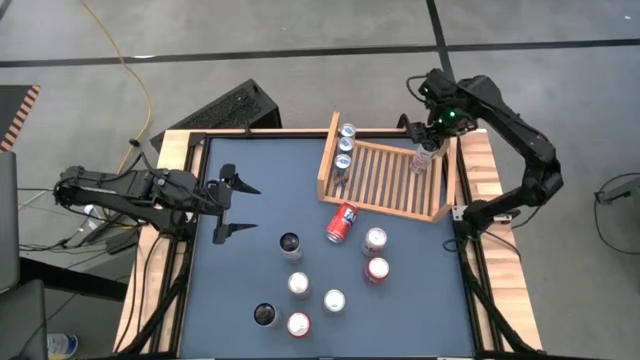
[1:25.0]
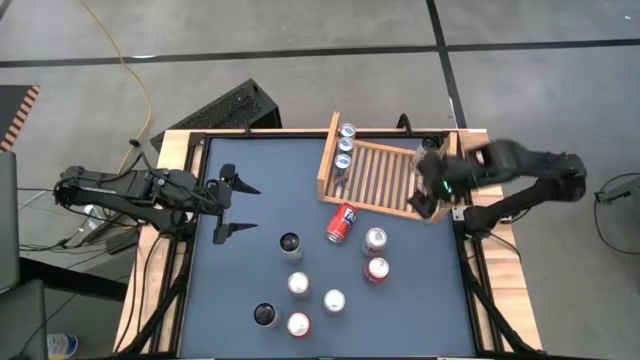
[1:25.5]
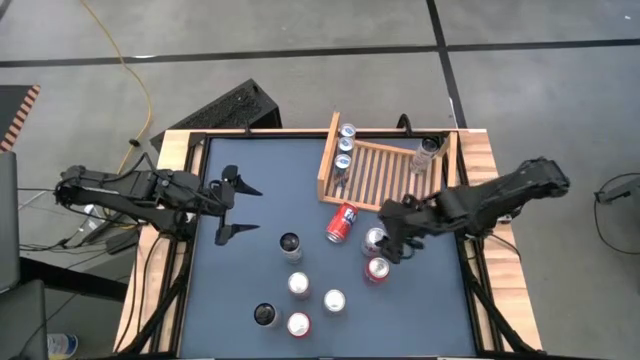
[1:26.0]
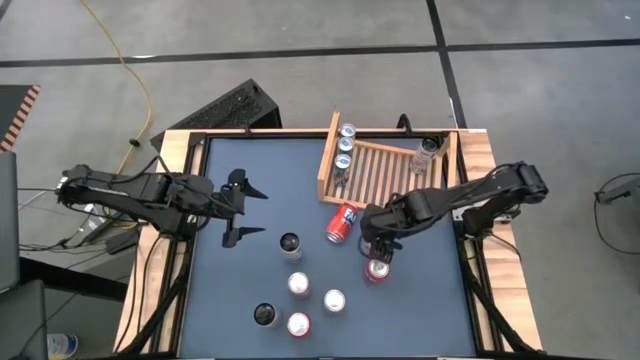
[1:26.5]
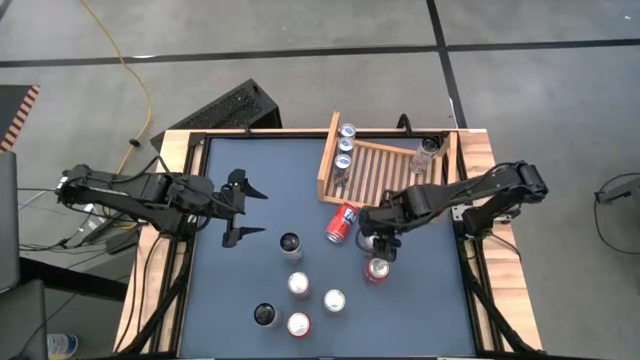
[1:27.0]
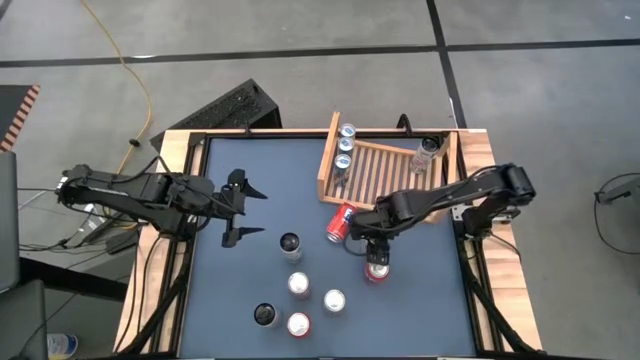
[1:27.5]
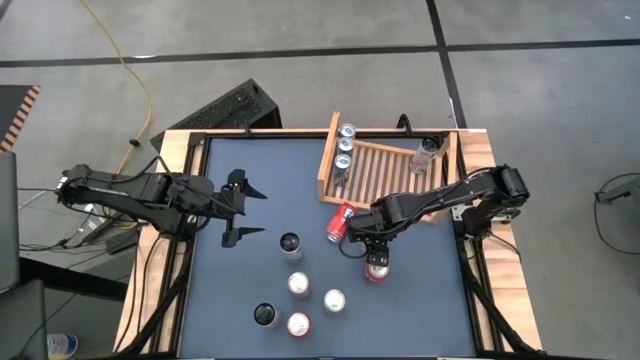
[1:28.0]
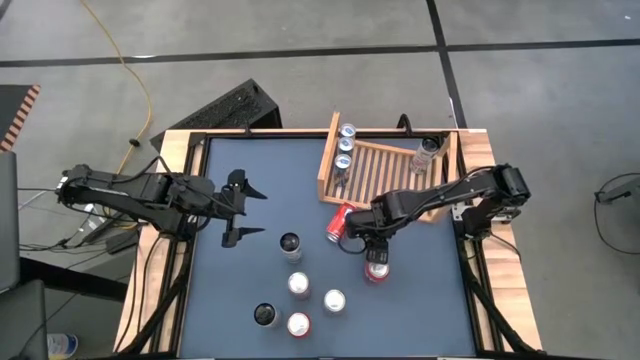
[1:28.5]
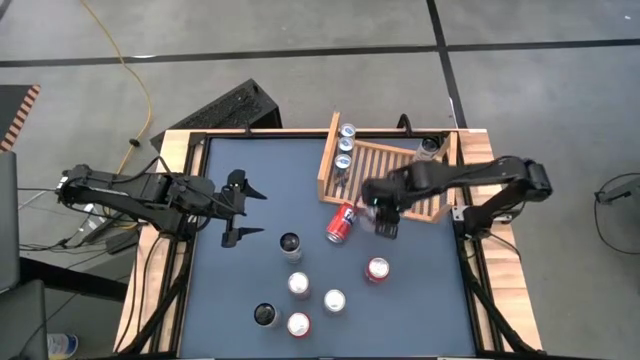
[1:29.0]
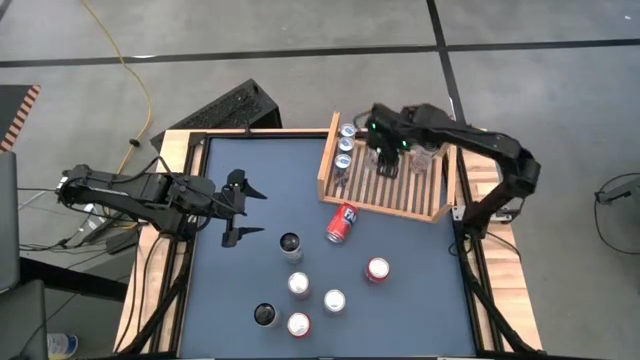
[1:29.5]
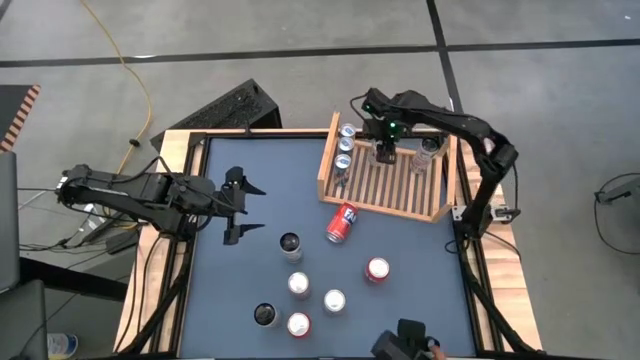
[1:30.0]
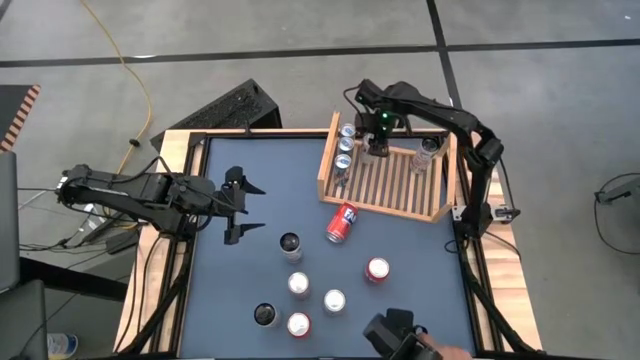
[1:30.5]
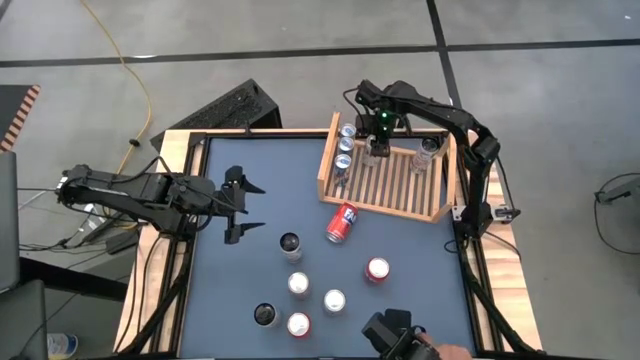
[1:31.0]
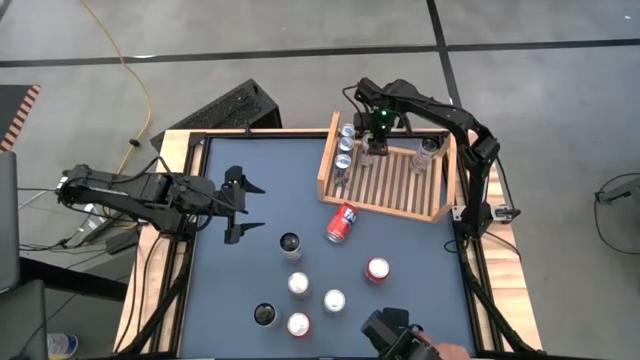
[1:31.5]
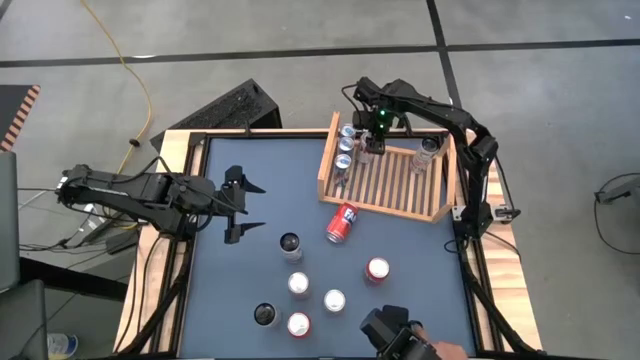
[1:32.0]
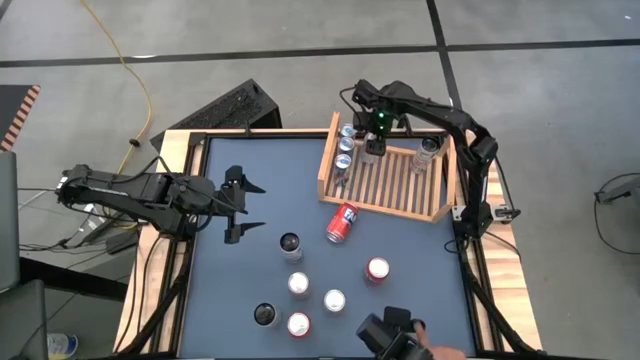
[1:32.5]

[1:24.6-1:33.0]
Task: Place canned beverage on shelf
Put the top silver soda can on the shelf

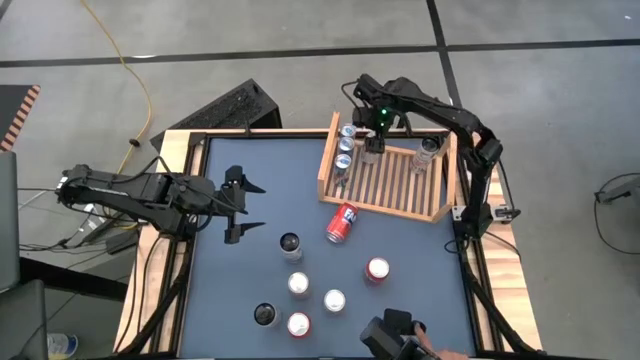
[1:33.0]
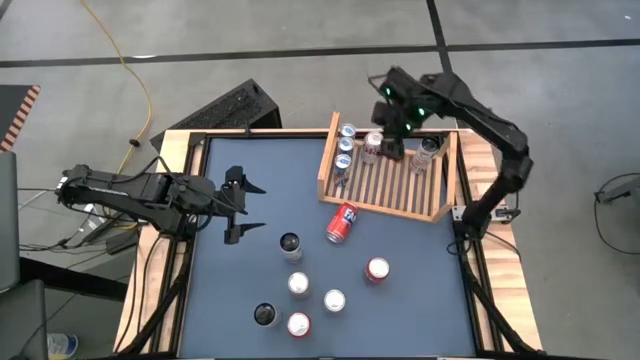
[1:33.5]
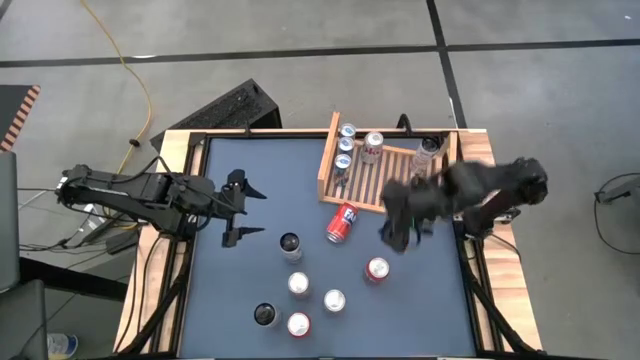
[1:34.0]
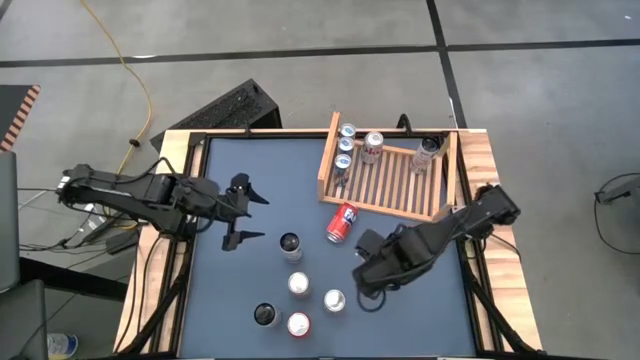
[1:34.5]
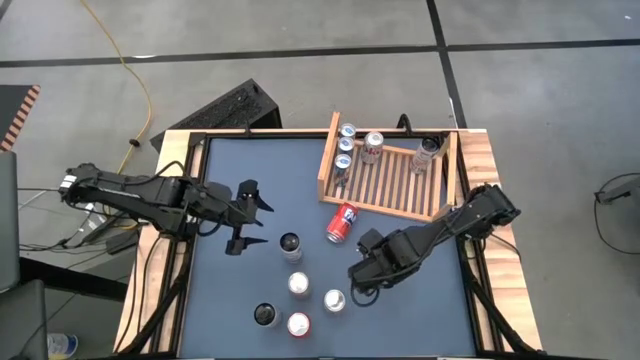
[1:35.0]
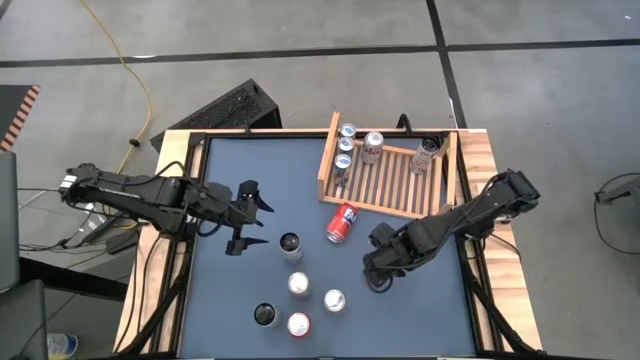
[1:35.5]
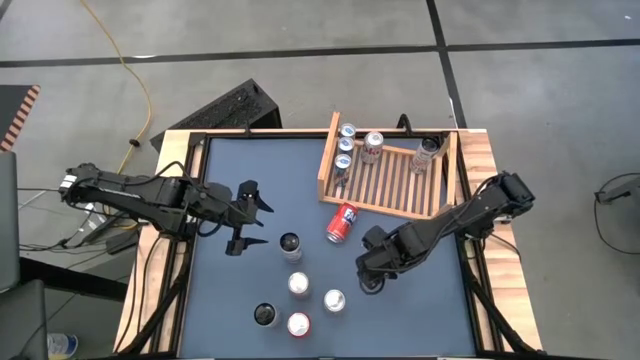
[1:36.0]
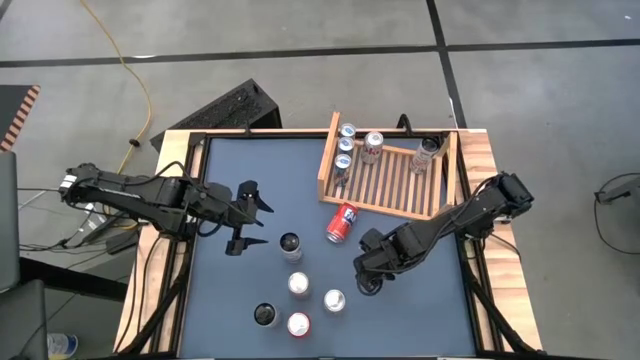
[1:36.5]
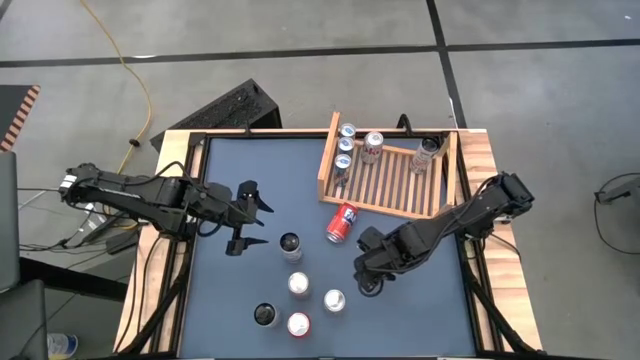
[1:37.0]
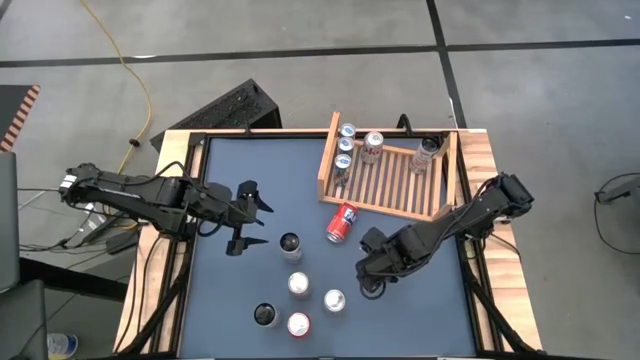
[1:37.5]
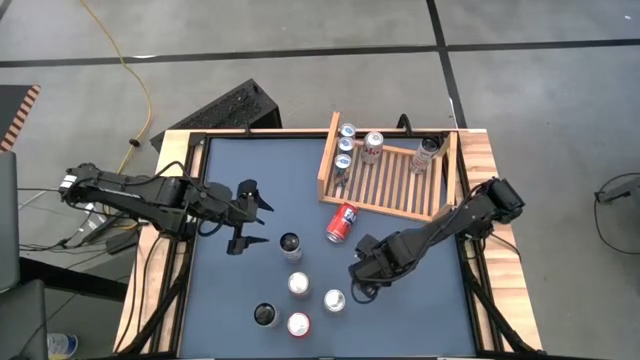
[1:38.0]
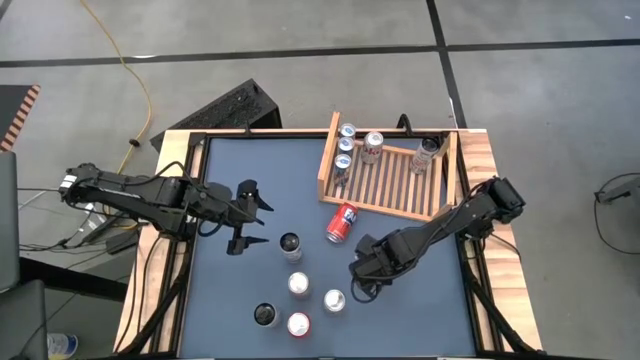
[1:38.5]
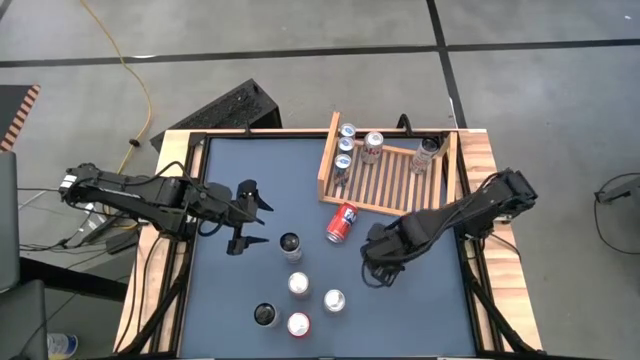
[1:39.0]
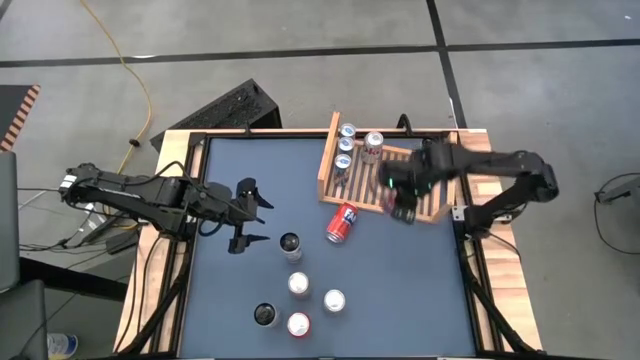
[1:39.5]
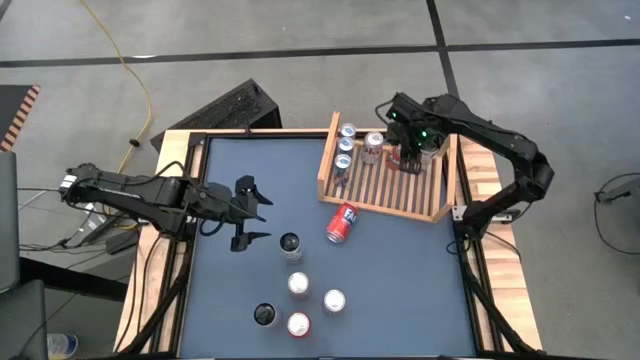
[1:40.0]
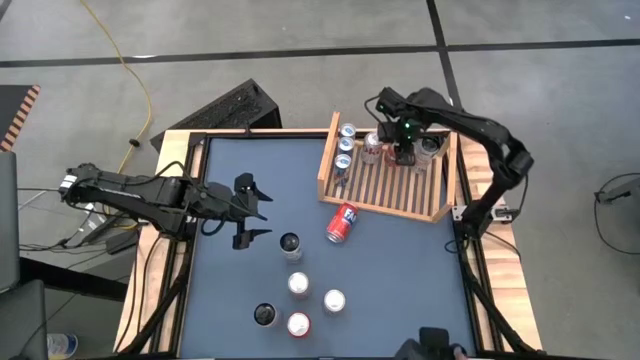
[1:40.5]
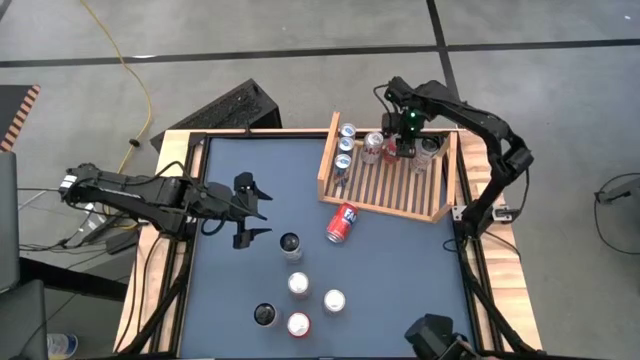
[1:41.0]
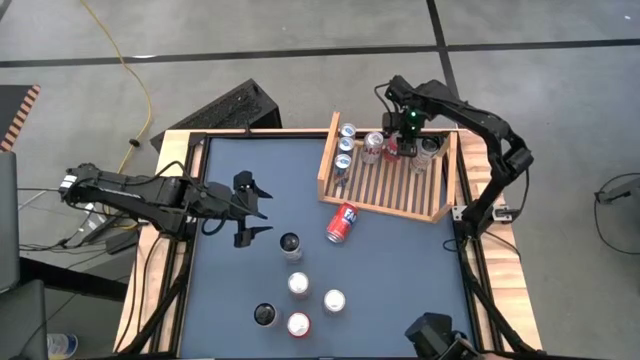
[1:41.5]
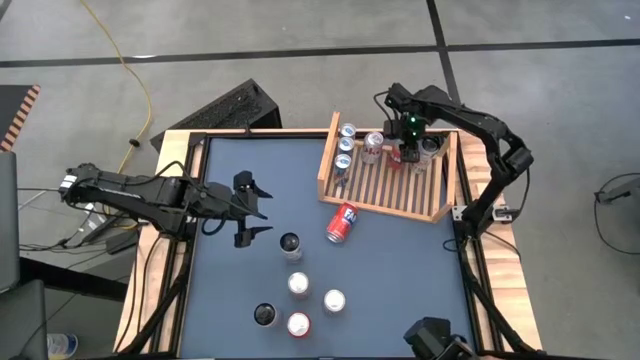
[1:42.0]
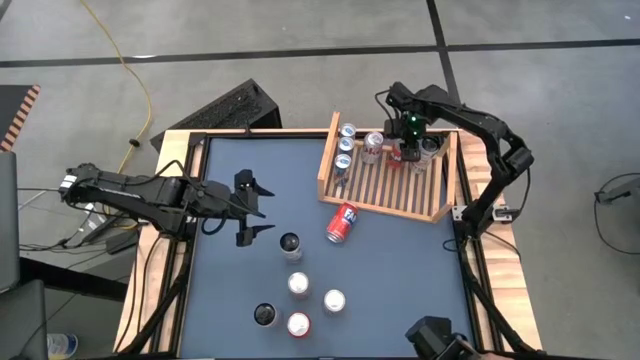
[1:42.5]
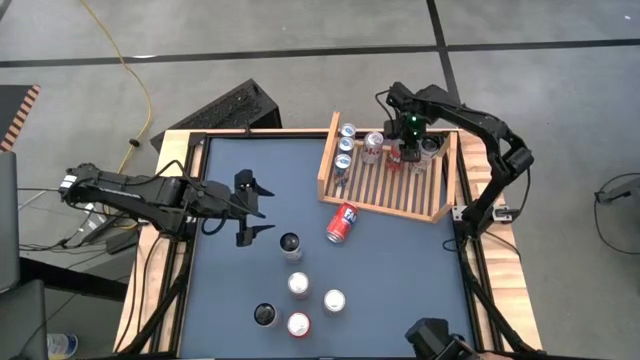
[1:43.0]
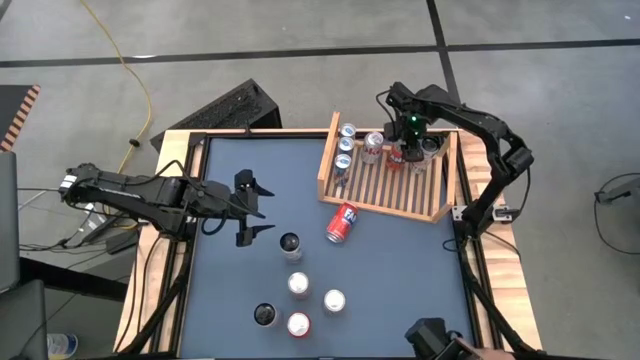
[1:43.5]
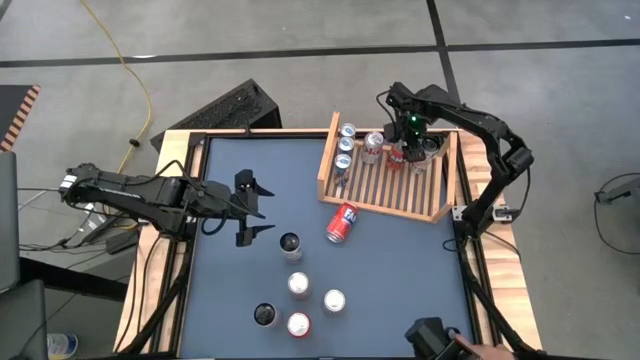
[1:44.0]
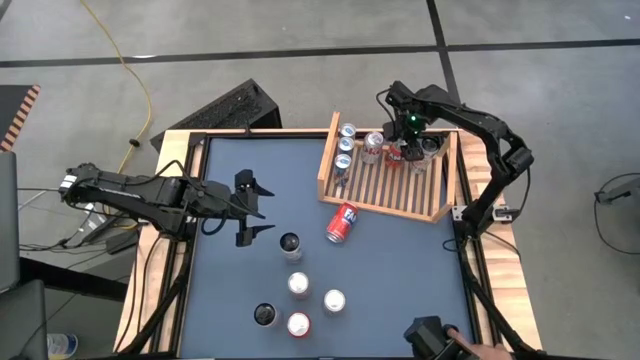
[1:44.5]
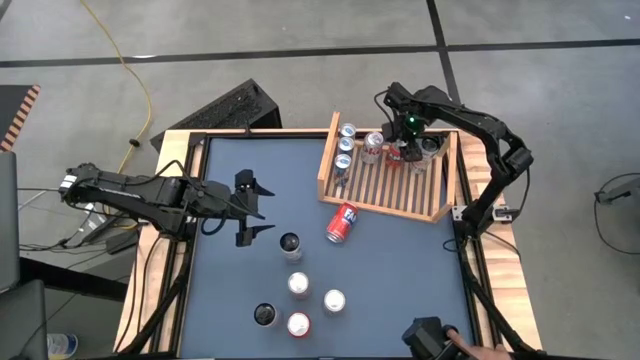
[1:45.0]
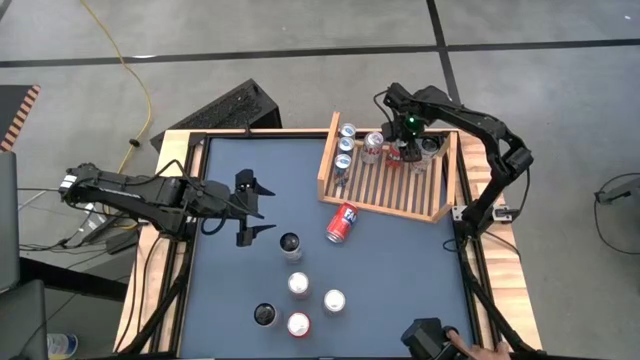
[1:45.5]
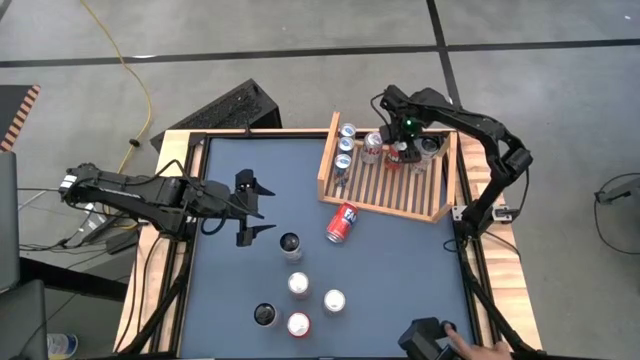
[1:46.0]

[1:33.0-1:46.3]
Put the middle red soda can on the shelf
